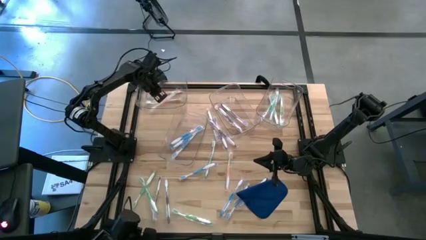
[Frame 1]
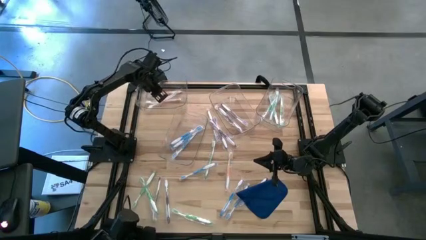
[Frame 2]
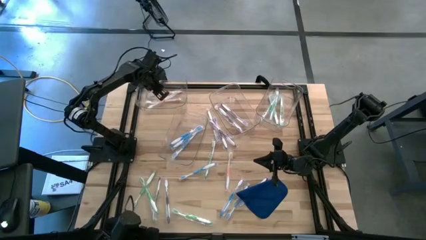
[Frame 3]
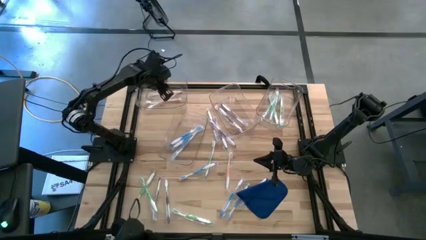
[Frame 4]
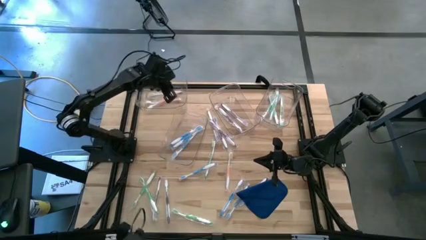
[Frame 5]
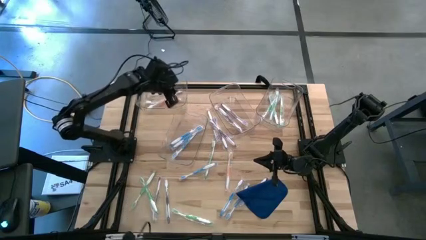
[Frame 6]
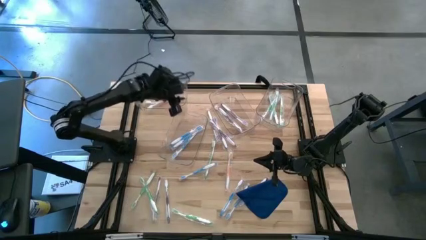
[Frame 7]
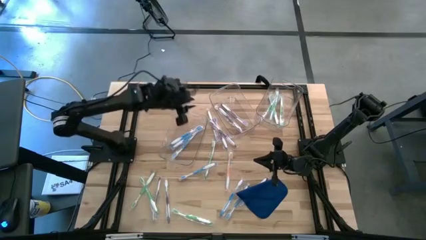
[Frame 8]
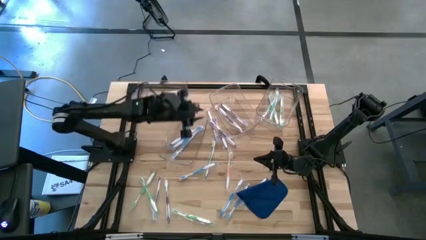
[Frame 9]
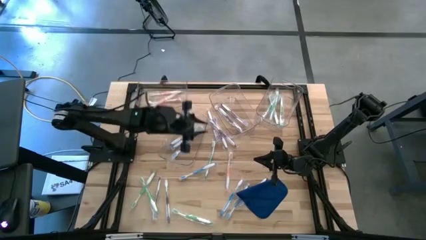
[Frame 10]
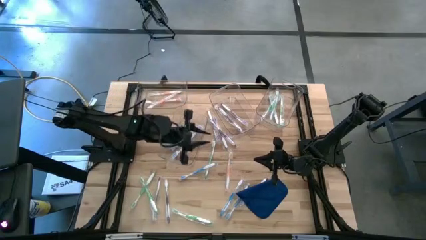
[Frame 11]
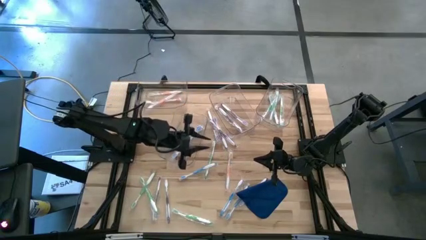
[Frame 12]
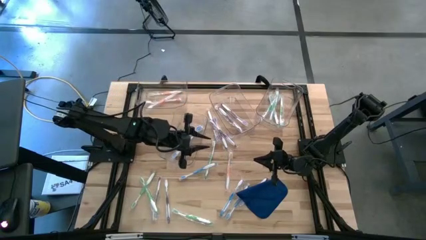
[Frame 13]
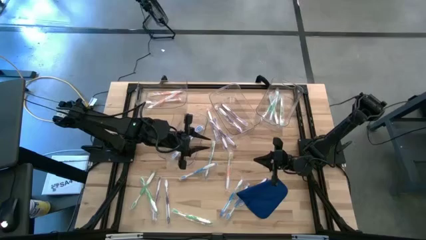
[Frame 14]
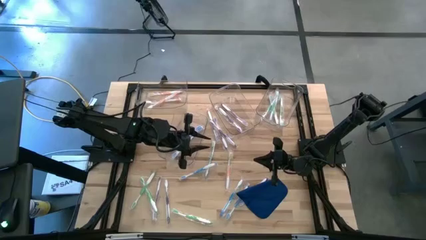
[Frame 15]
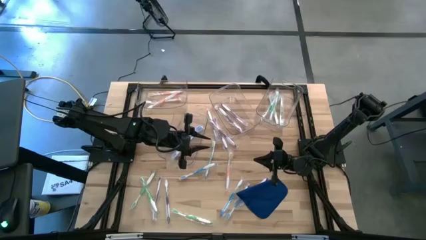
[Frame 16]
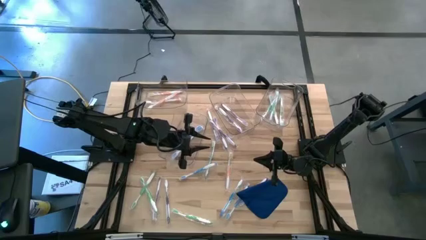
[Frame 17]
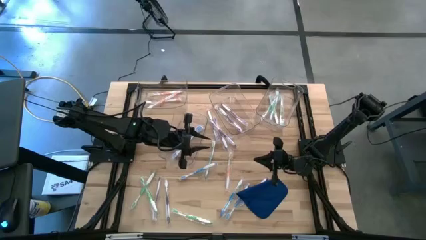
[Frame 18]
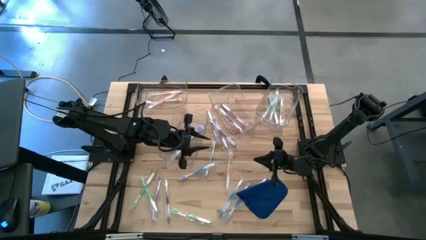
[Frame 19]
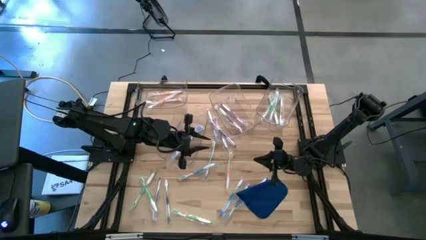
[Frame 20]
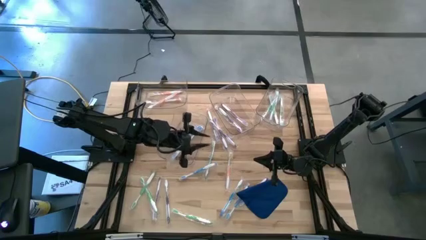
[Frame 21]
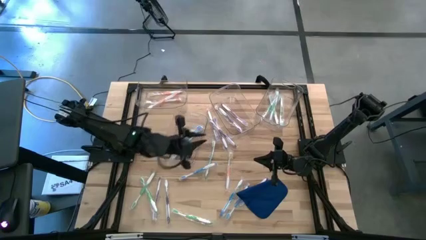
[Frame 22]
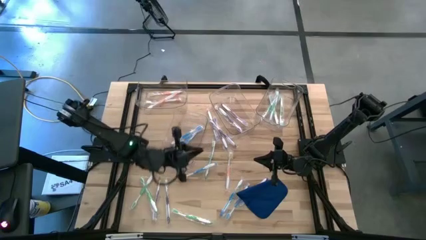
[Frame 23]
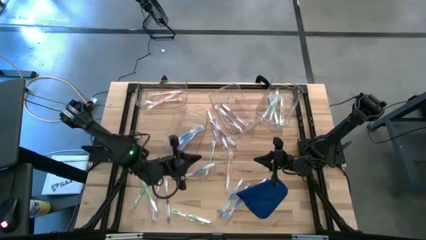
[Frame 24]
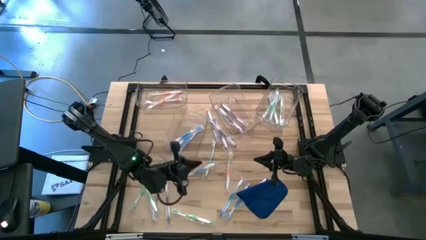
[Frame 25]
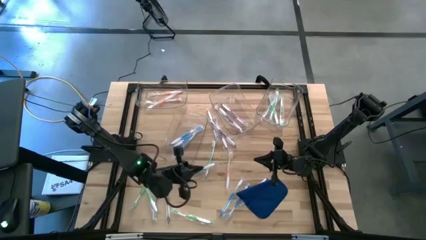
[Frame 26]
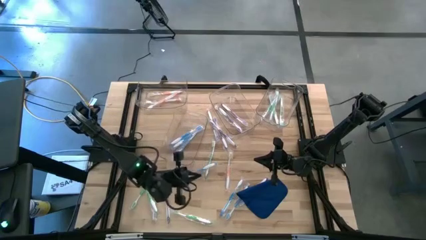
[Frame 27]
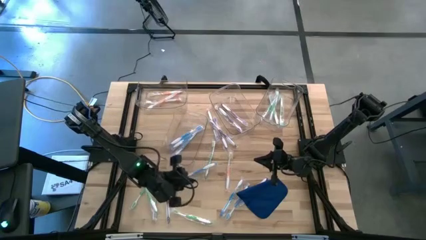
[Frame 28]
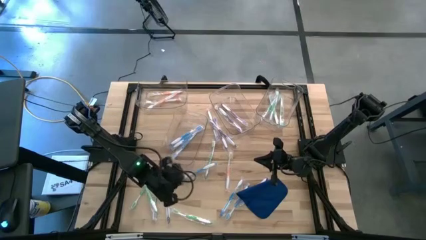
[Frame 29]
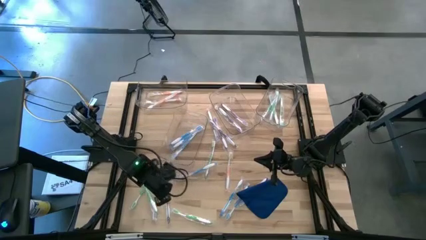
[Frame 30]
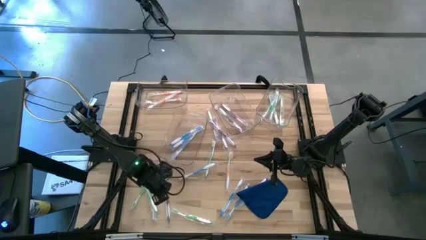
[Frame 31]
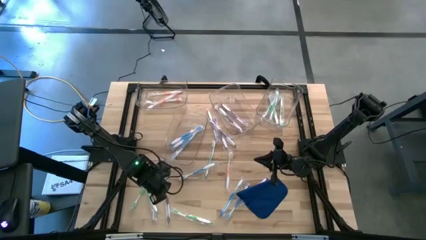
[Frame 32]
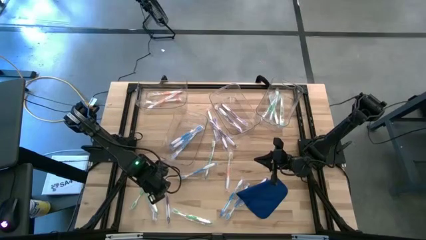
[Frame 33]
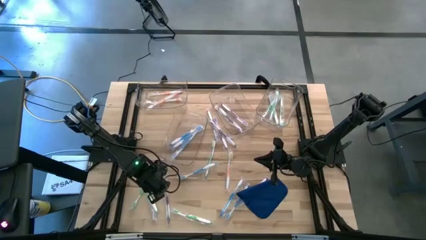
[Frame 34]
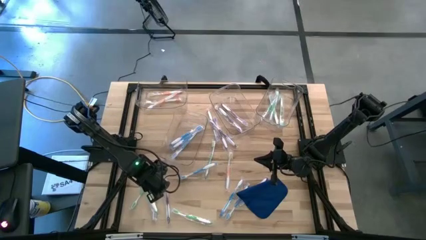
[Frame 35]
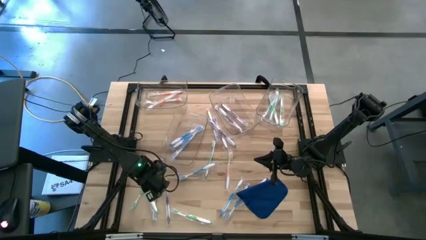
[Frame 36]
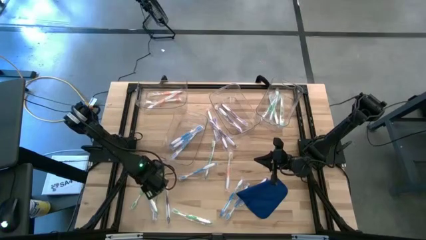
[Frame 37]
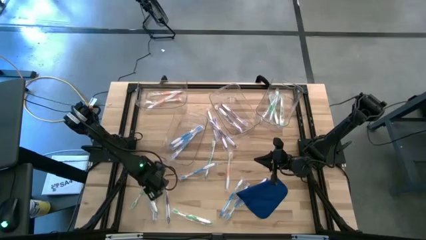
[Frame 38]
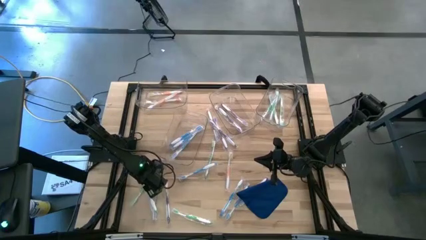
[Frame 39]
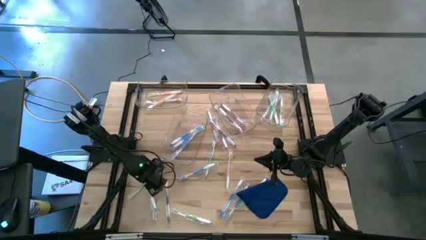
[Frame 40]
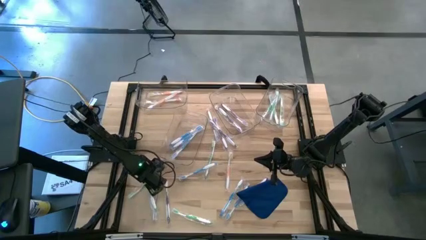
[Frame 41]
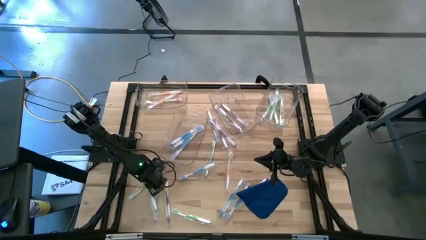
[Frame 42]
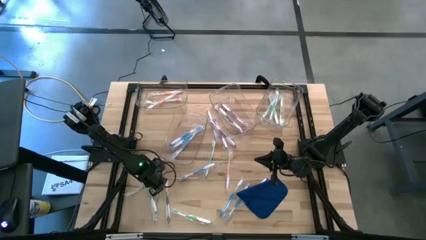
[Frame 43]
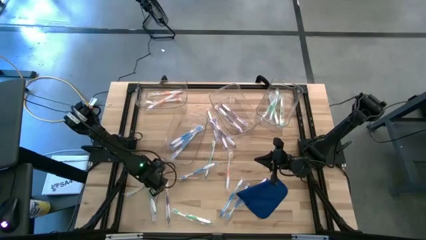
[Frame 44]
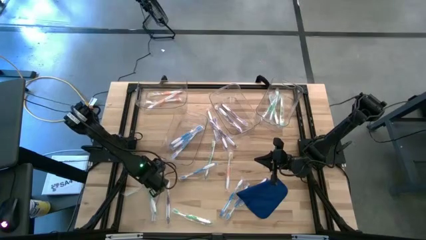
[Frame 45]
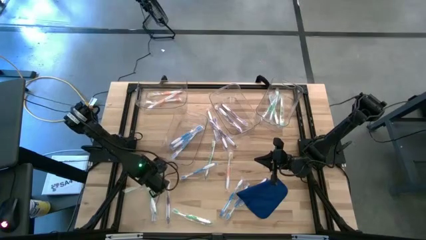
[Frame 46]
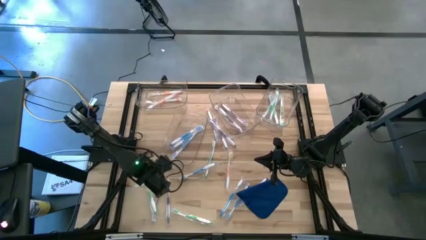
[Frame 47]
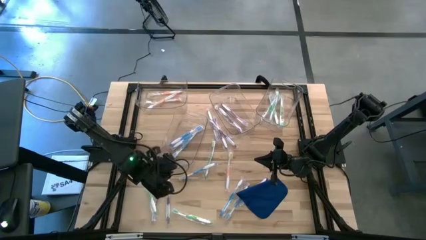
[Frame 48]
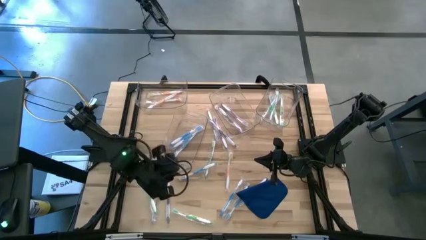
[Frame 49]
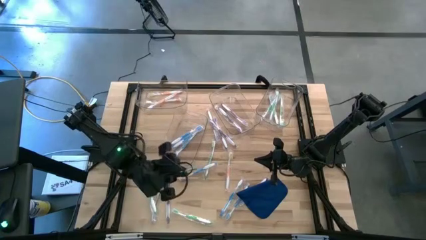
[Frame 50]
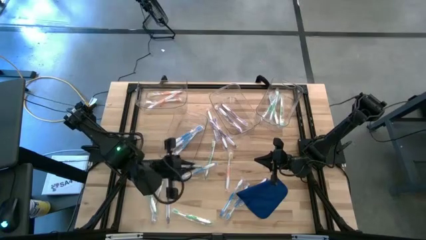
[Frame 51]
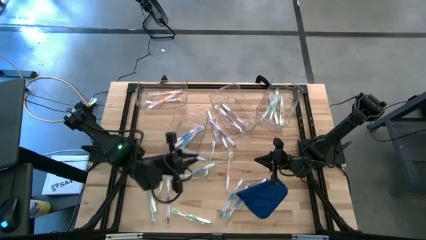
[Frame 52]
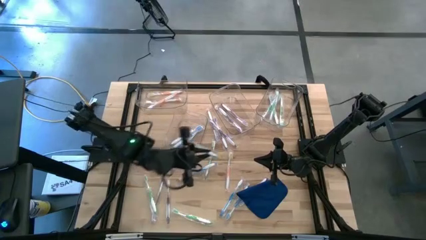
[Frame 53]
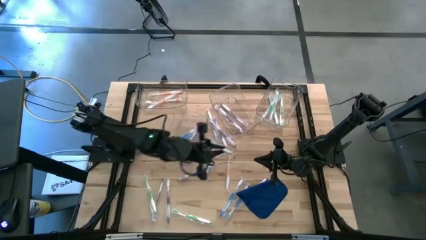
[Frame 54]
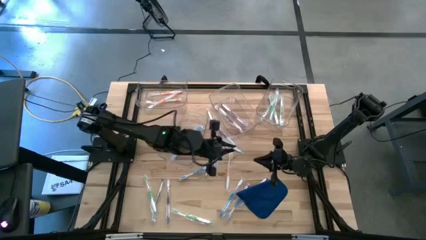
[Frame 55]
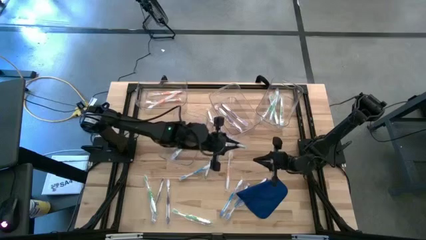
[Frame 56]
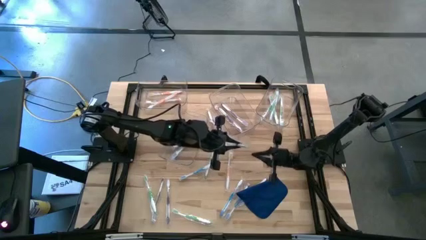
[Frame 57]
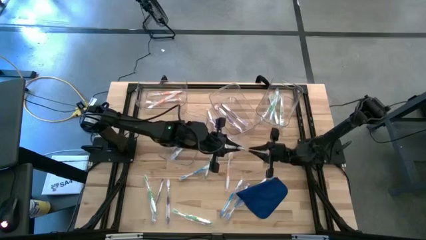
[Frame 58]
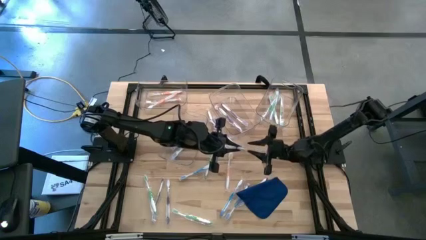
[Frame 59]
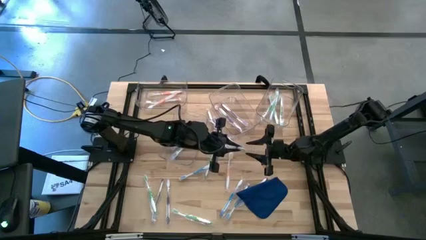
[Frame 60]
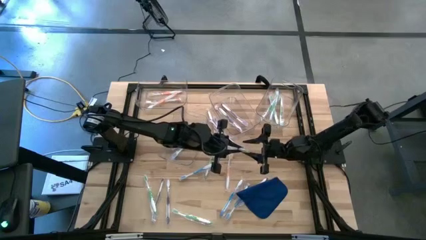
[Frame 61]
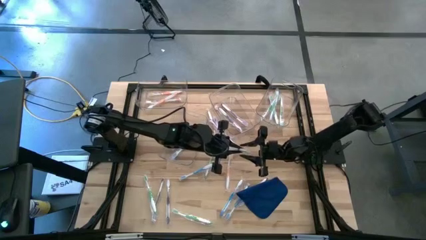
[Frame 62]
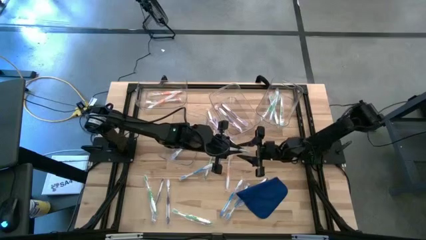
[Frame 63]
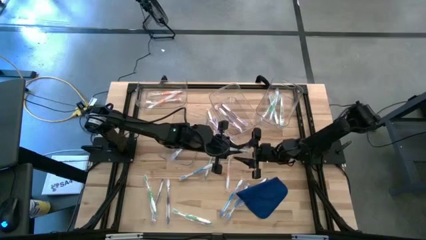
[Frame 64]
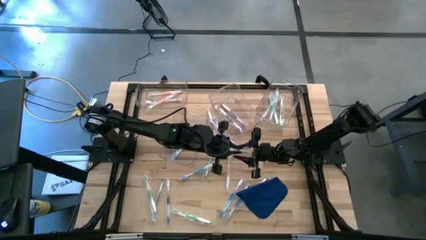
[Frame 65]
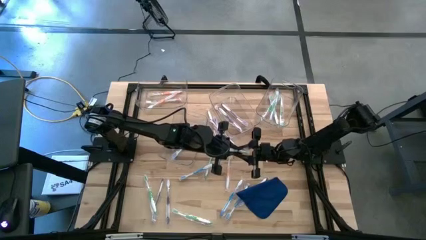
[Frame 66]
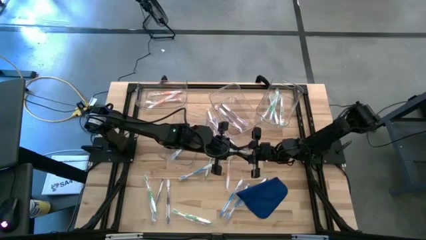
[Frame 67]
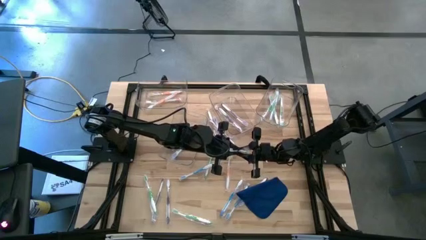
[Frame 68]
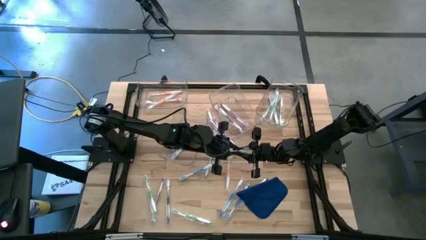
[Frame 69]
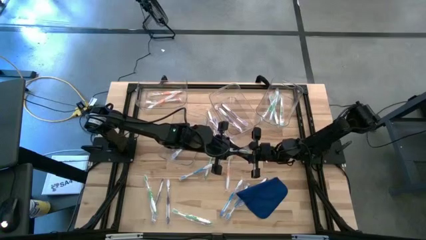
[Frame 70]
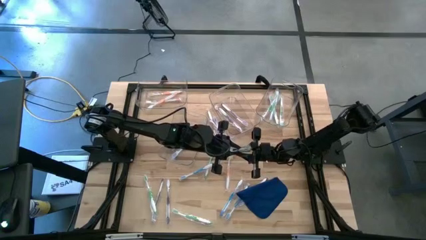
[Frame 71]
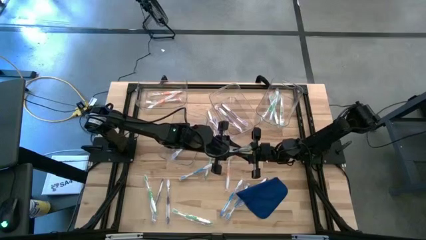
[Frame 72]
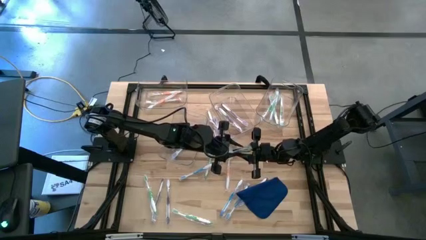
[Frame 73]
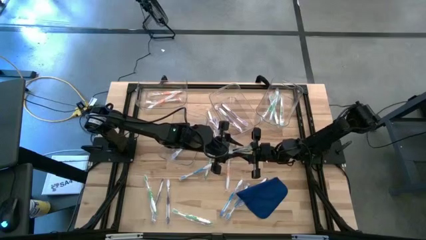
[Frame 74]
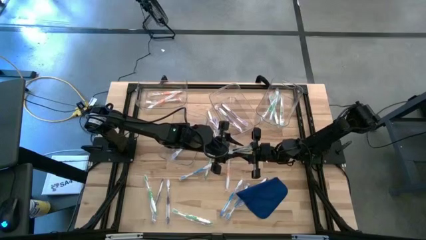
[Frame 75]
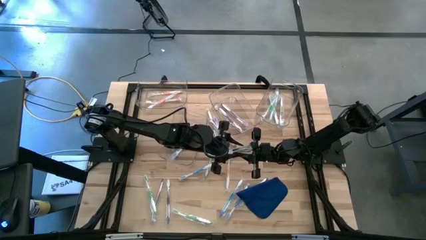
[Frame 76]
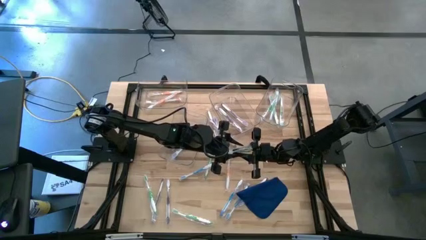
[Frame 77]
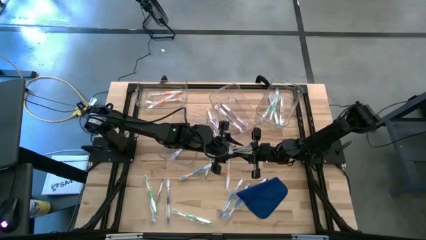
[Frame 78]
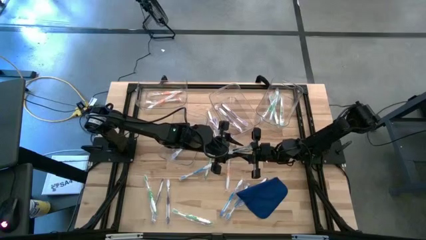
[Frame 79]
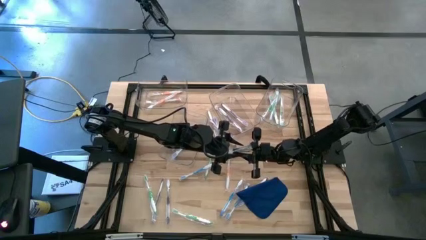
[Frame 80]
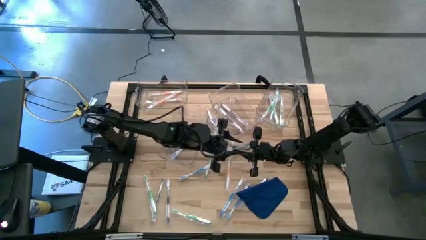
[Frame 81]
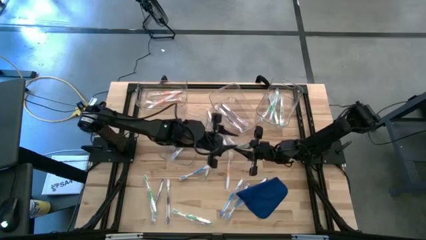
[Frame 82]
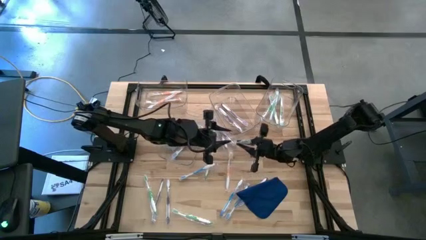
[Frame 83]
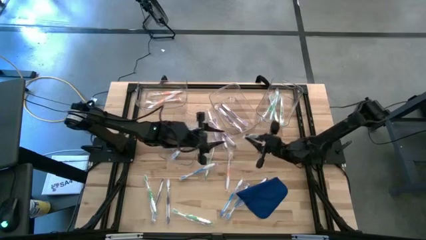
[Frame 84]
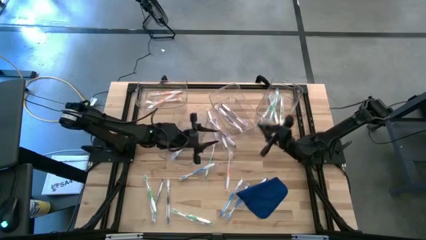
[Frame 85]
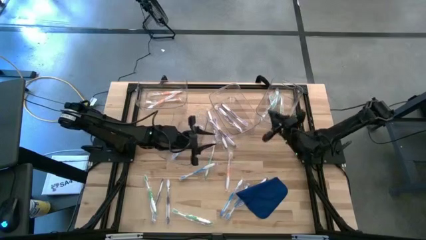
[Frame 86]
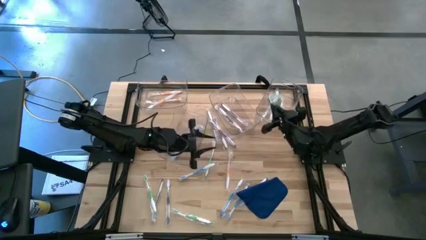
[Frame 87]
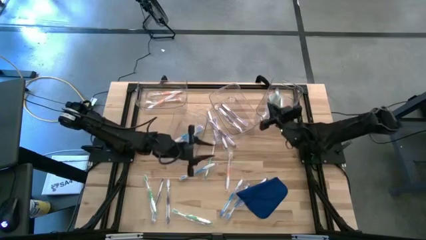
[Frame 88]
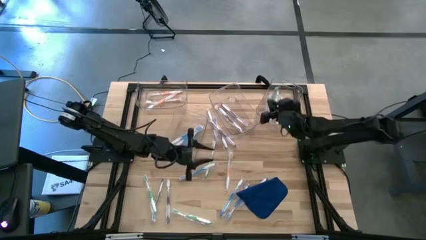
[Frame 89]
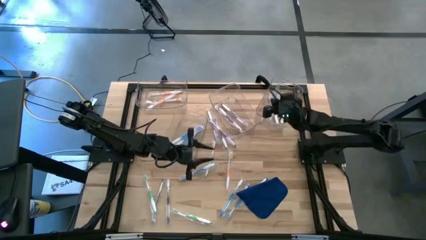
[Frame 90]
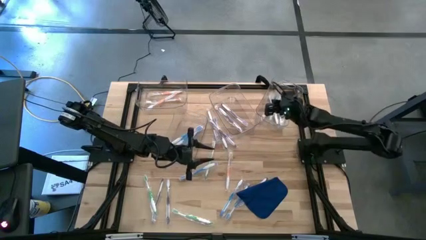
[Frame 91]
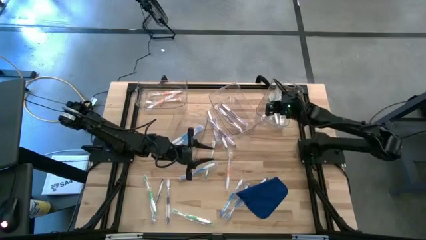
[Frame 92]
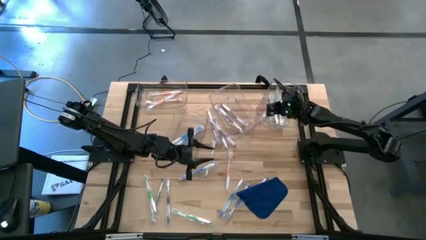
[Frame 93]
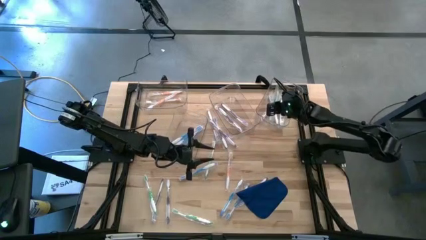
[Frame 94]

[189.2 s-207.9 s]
Task: Pick & Place Toothbrushes
Put the green toothbrush into the top right transparent bin
